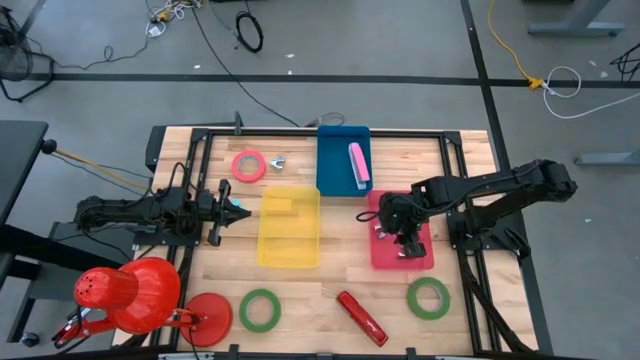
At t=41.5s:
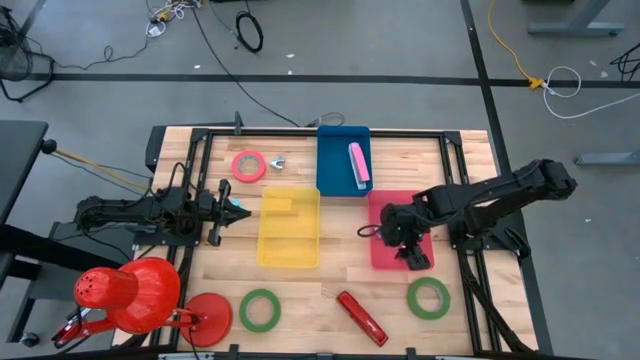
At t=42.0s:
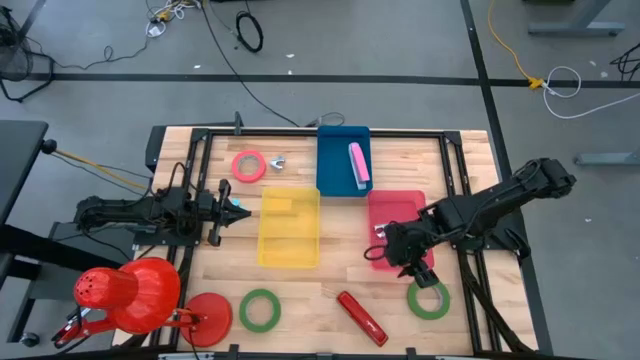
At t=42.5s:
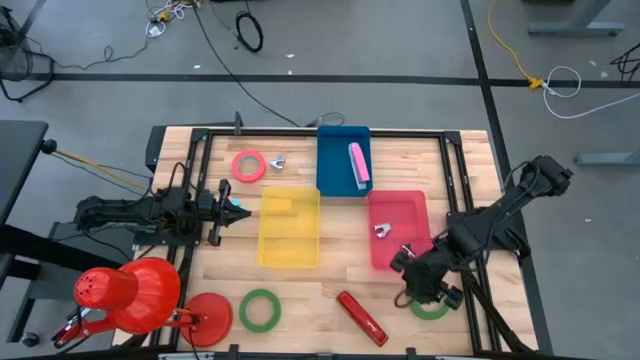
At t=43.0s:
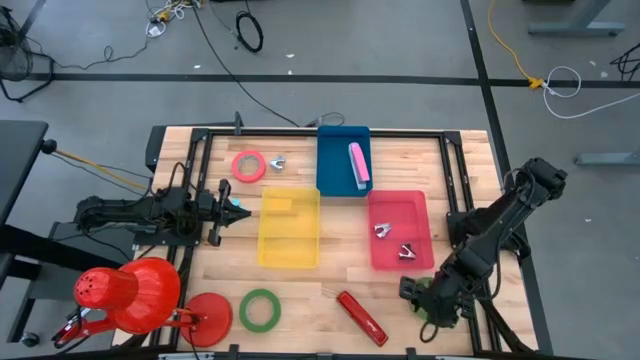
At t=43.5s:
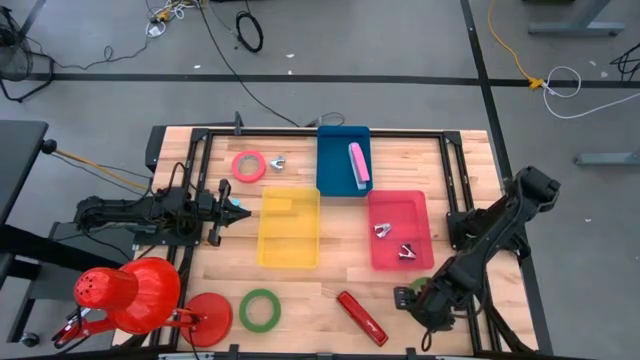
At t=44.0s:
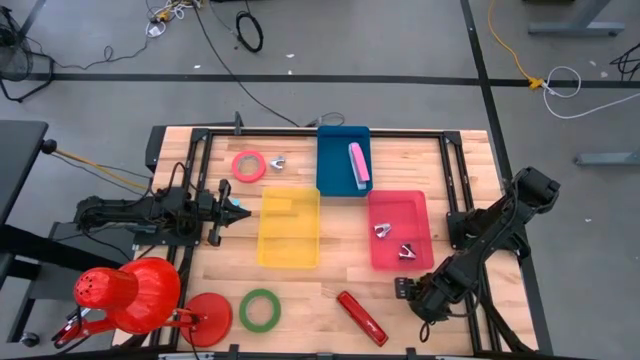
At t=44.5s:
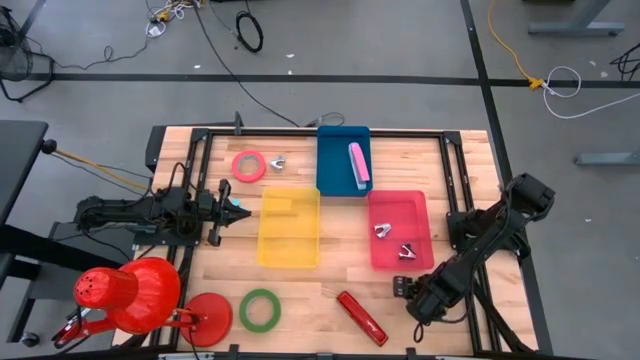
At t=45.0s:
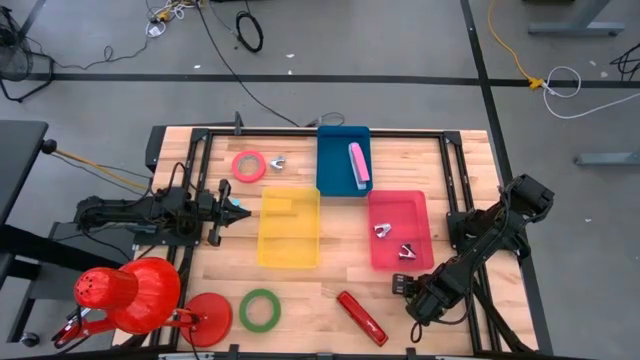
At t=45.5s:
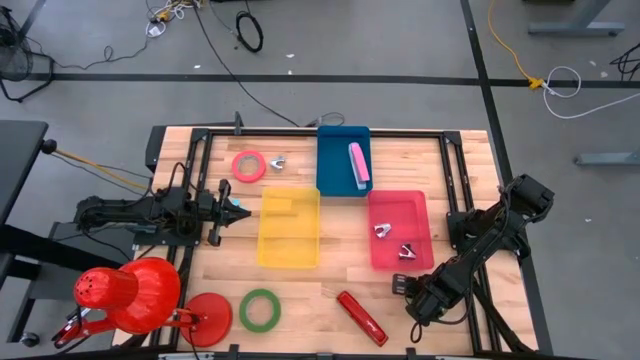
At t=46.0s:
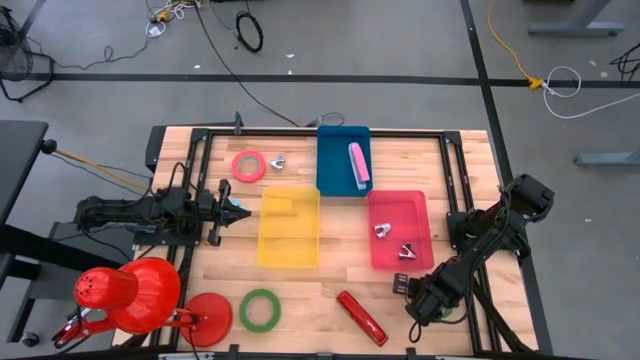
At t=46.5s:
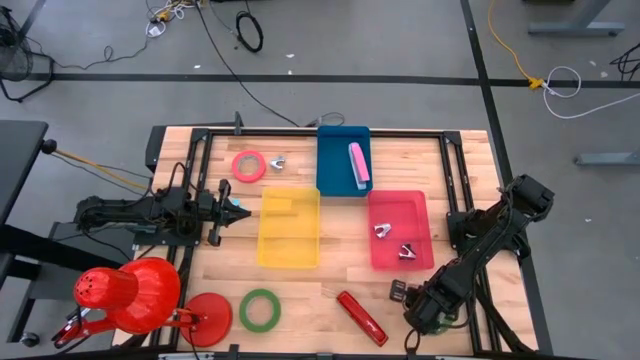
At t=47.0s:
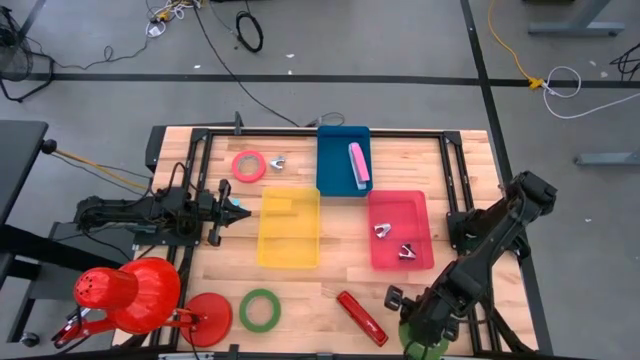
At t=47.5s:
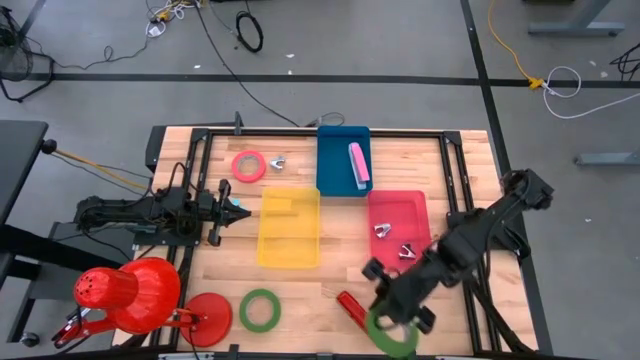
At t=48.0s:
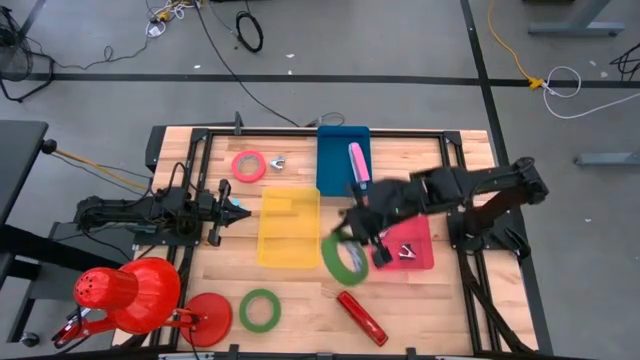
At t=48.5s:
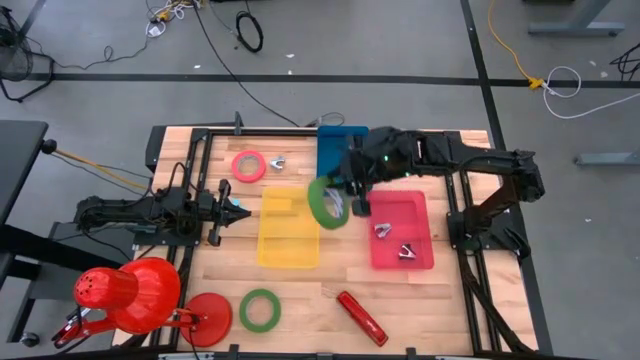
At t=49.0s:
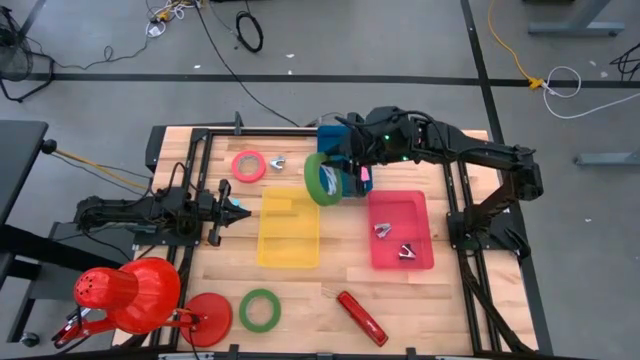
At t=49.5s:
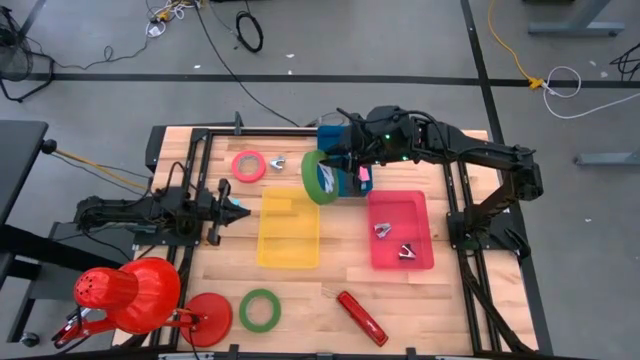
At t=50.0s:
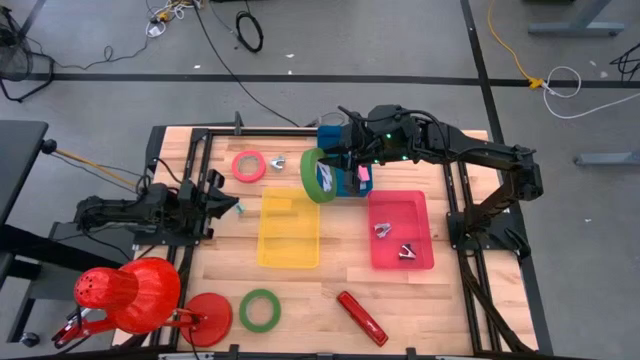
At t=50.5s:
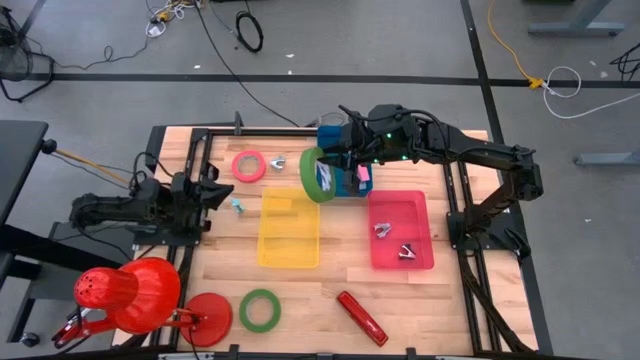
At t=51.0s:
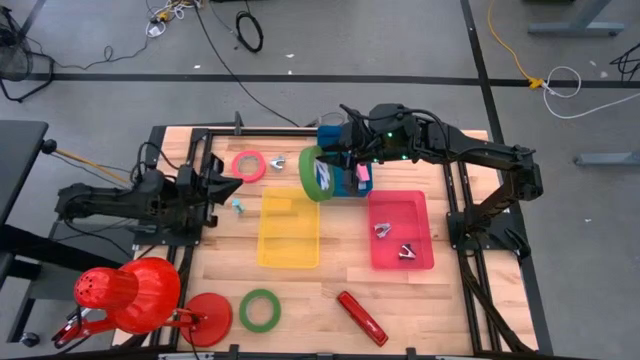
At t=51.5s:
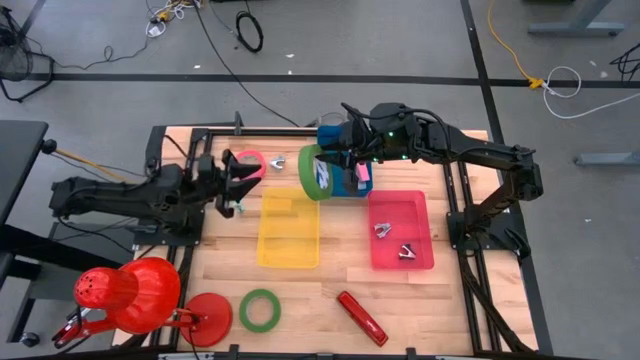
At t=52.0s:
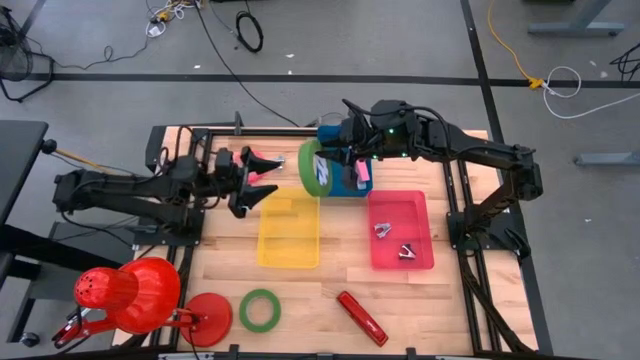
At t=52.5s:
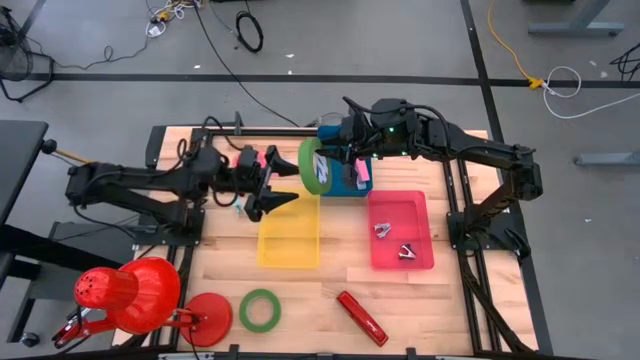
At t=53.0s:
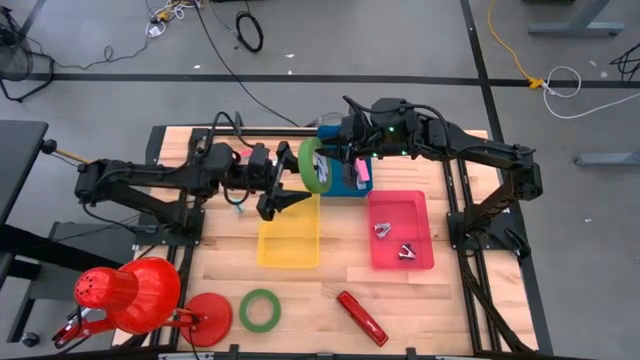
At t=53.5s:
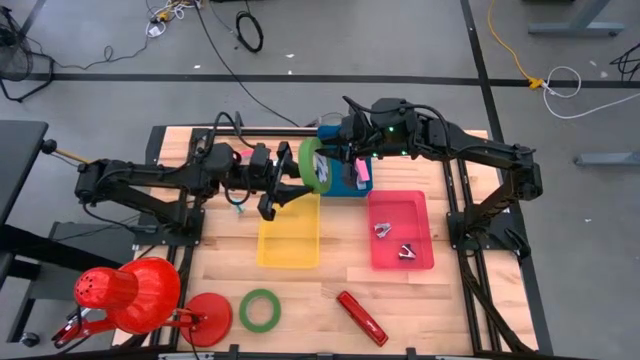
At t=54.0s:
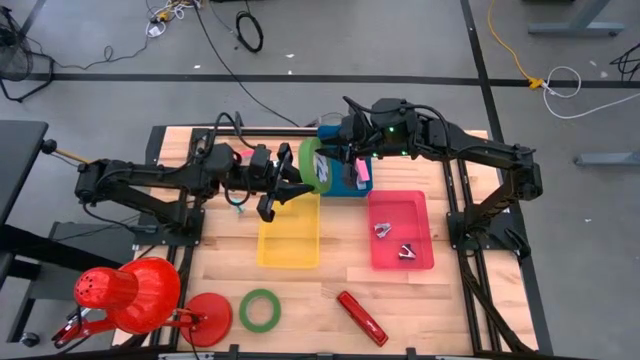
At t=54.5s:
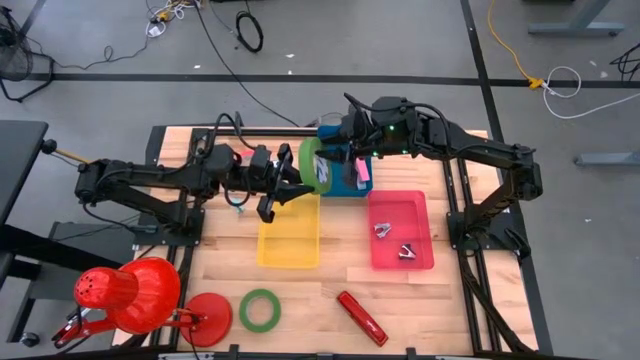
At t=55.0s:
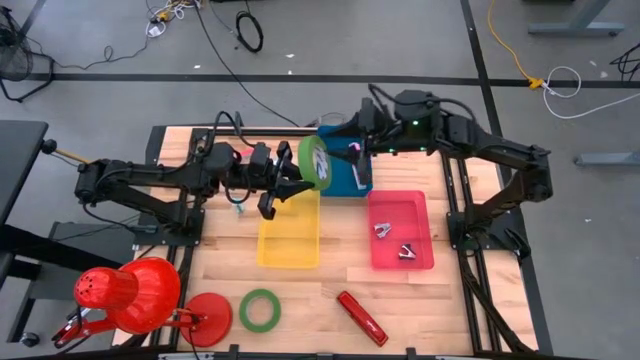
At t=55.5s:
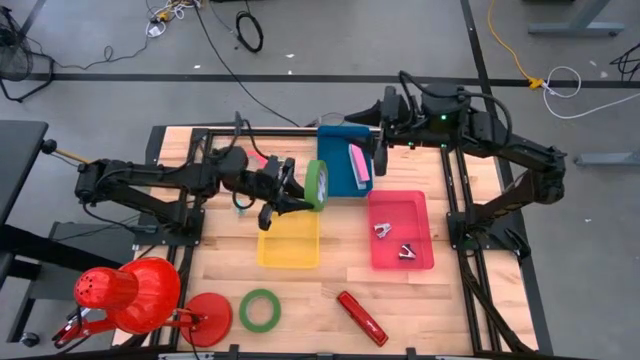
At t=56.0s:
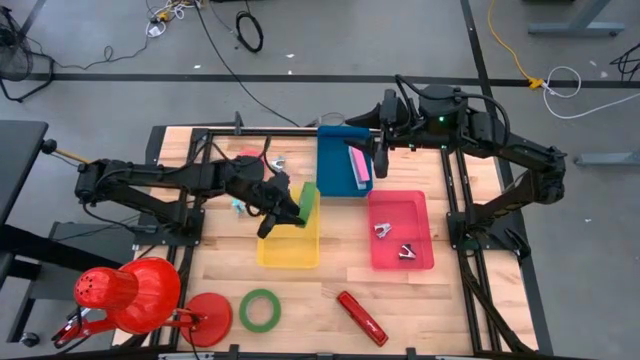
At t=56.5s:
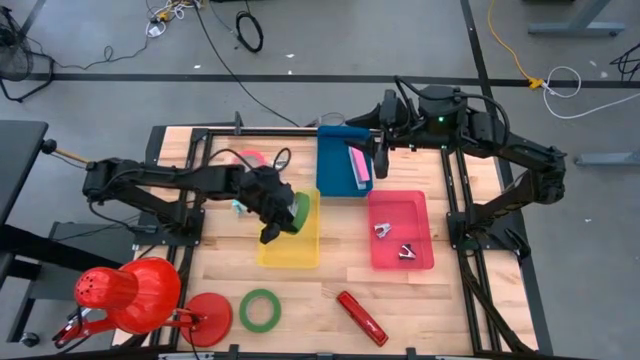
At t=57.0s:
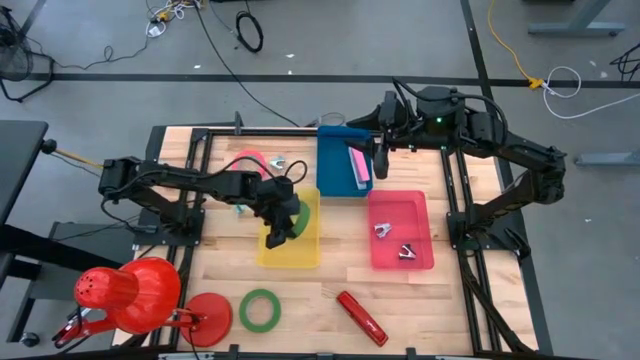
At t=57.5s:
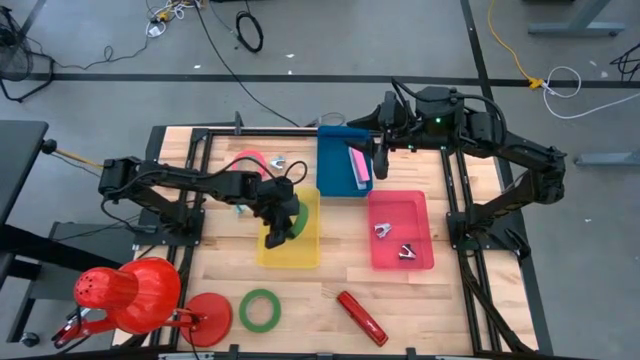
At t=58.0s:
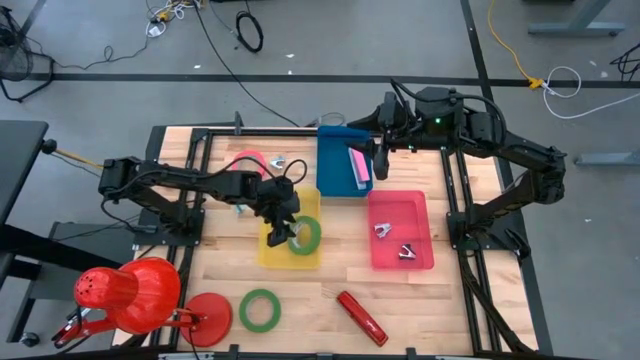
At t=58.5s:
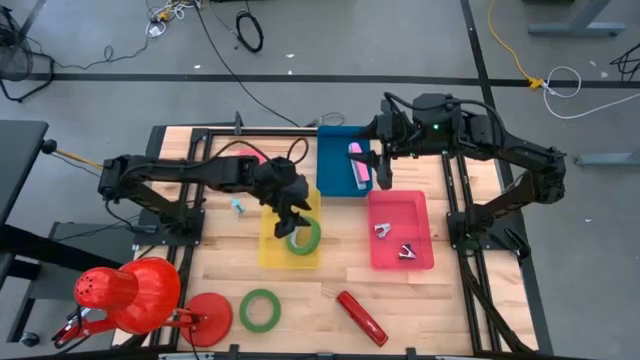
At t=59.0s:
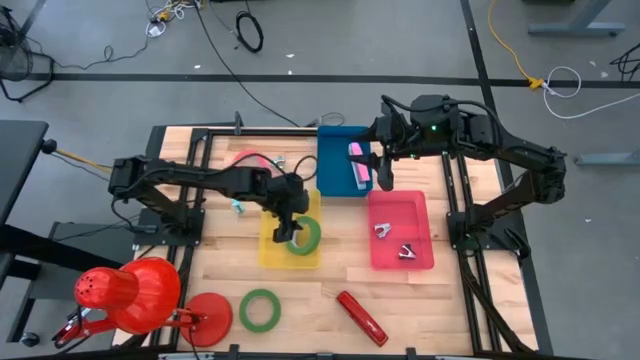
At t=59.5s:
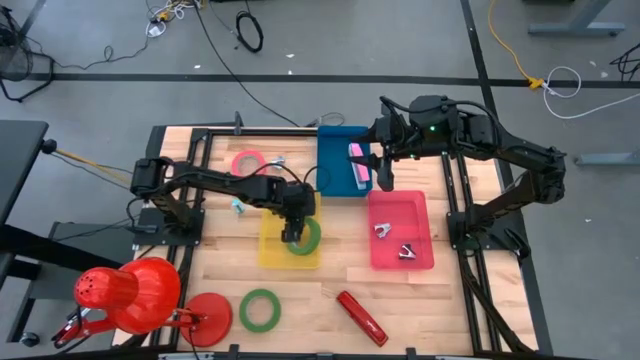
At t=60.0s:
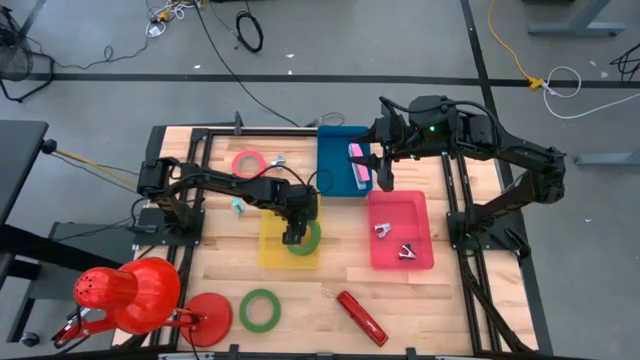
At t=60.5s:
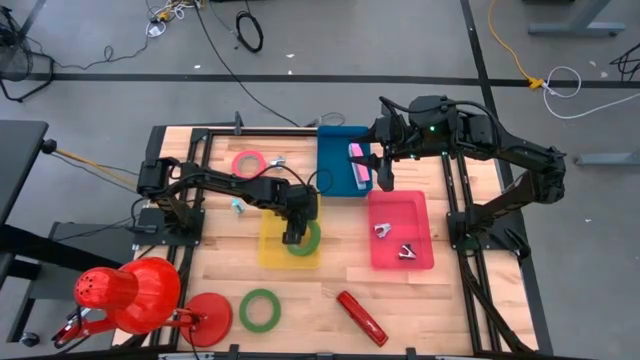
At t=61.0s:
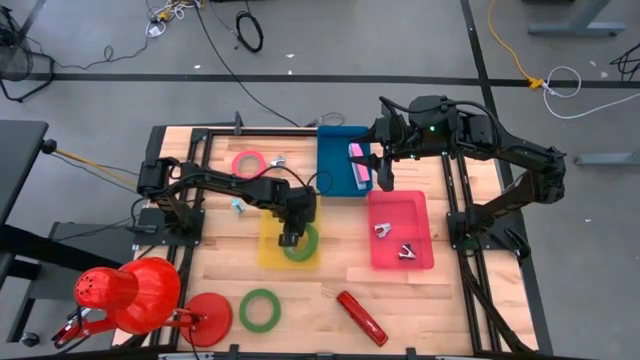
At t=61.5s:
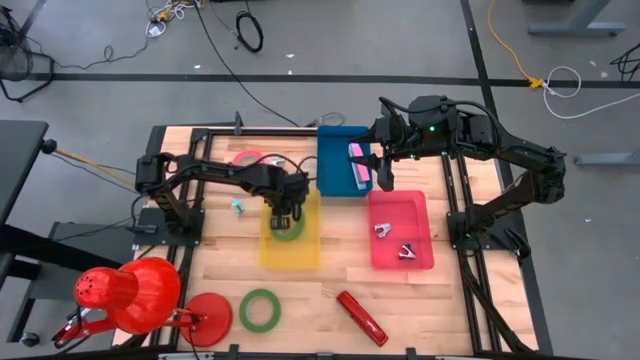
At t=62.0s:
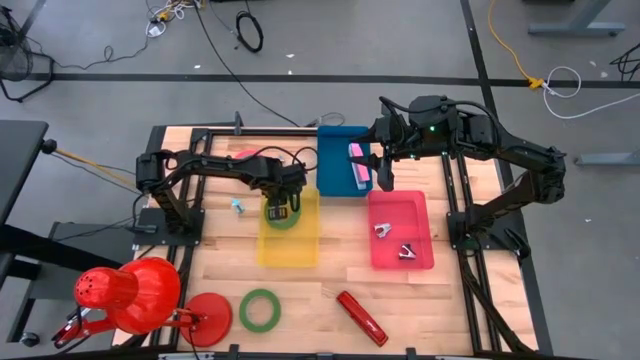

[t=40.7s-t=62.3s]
Task: Pick and place Stapler, Stapler remover, tape
Put the right green tape into the yellow bin
